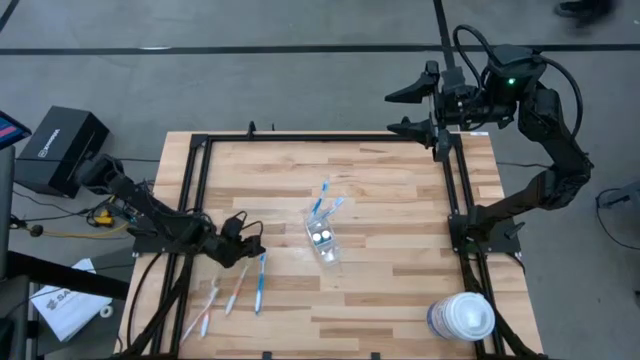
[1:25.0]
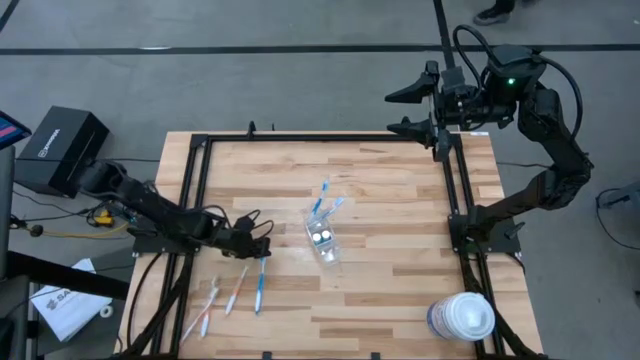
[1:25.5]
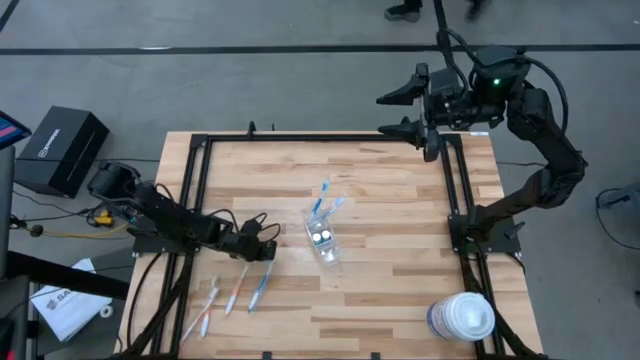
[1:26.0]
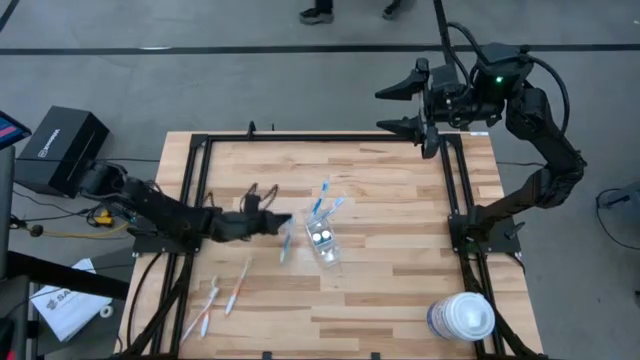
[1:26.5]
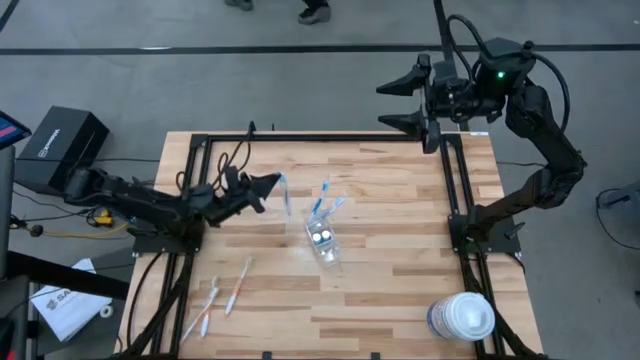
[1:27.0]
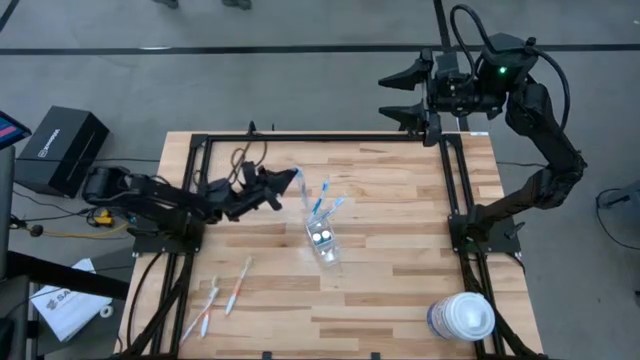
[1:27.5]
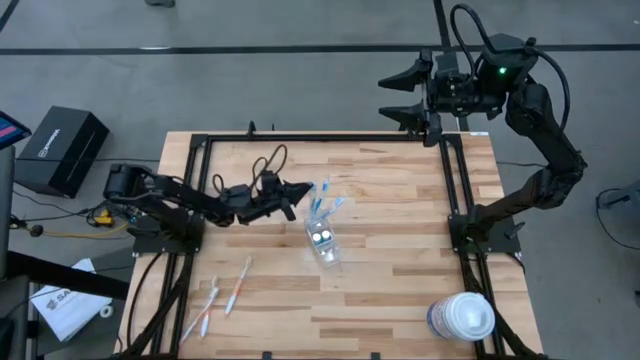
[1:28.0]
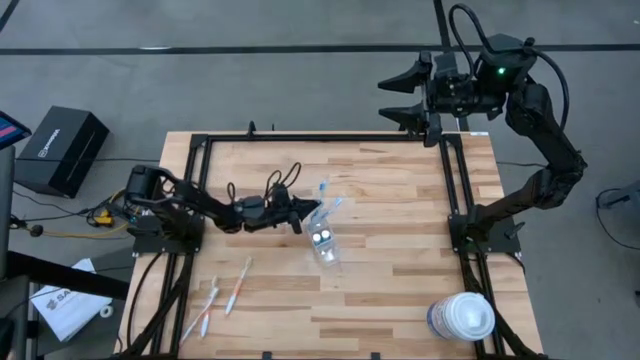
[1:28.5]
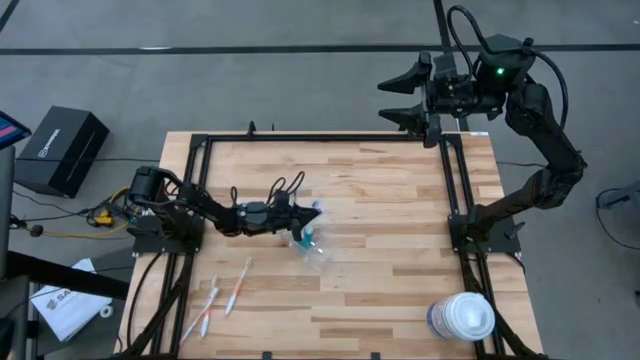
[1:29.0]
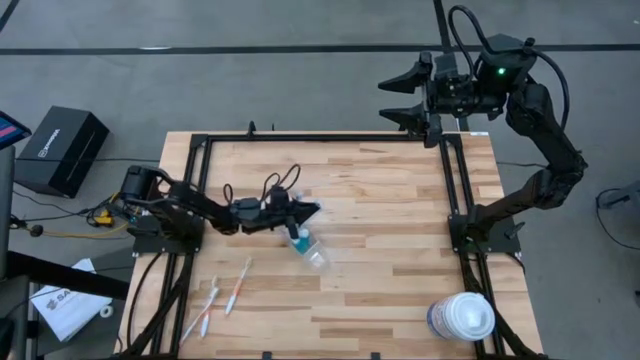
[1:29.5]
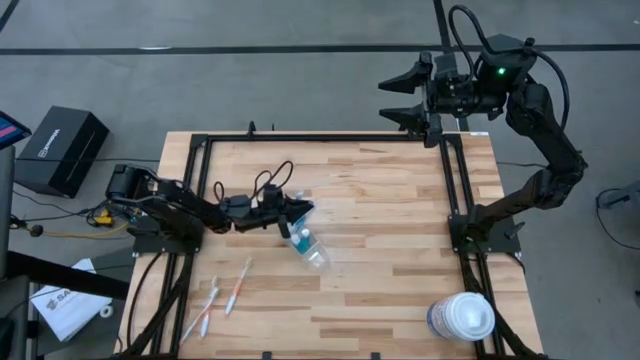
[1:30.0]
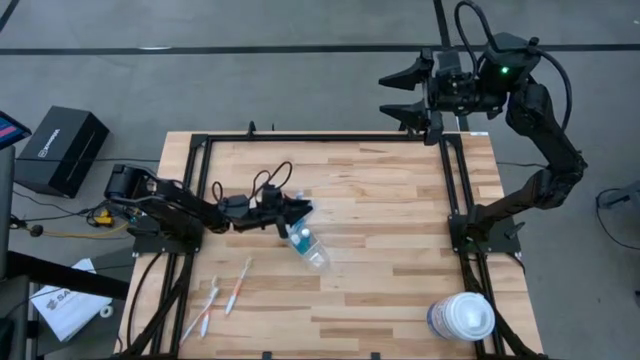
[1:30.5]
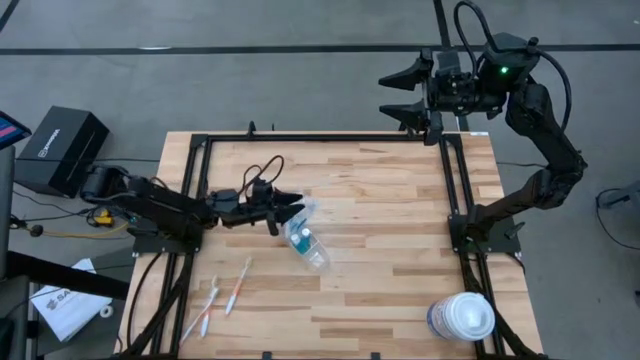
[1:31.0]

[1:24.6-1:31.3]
Task: Pick & Place toothbrushing station
Put the blue toothbrush into the transparent organizer

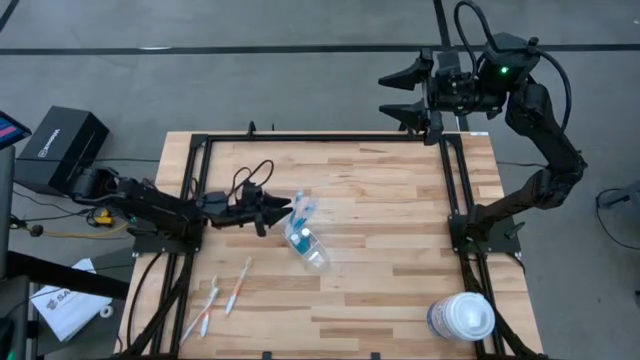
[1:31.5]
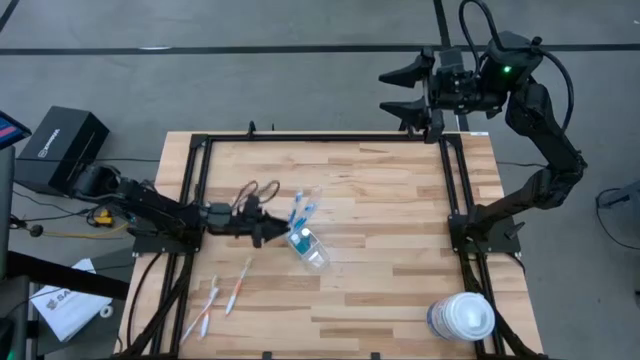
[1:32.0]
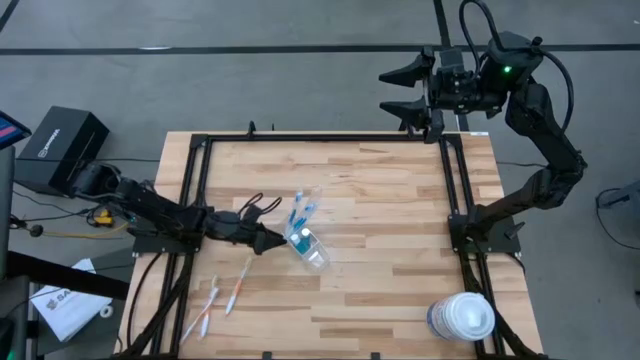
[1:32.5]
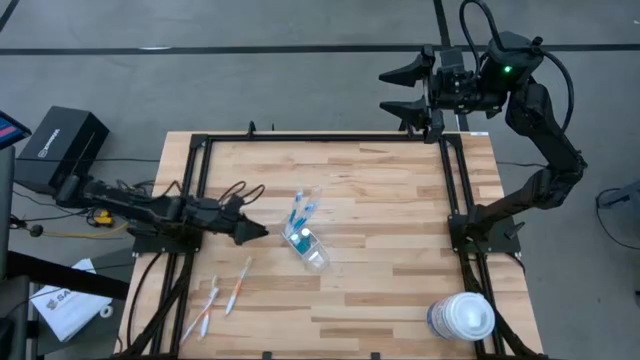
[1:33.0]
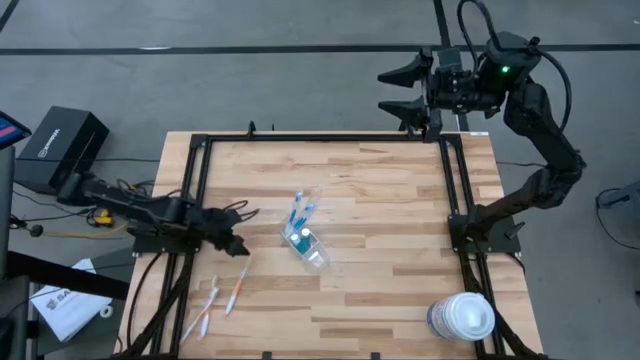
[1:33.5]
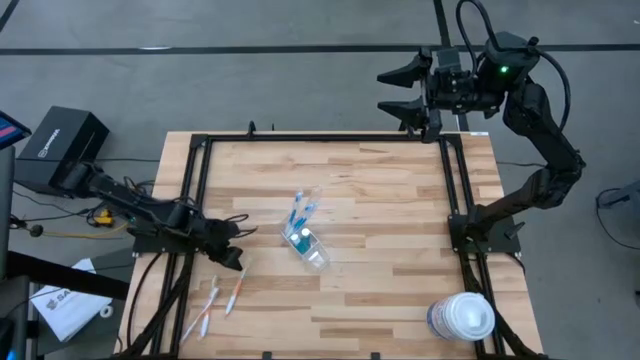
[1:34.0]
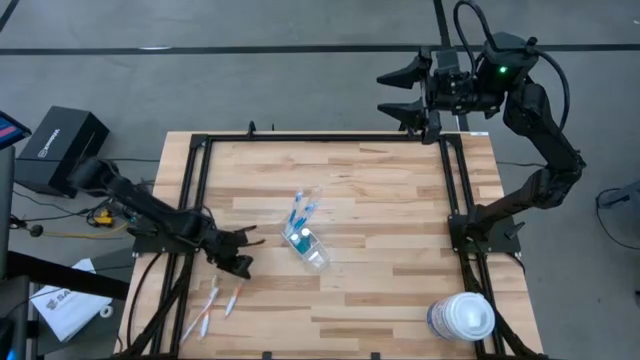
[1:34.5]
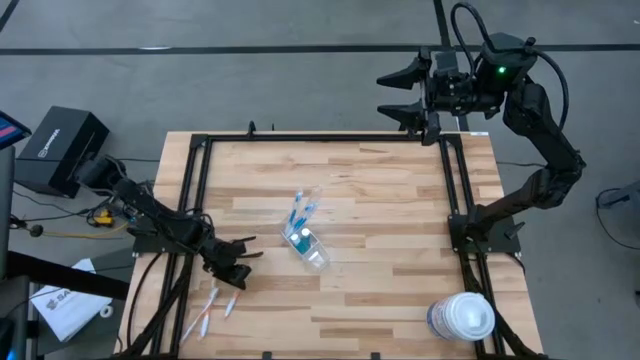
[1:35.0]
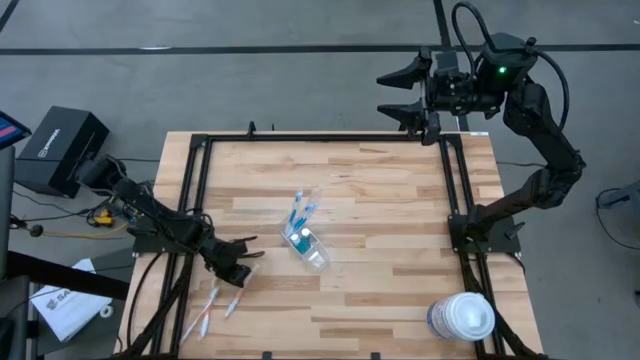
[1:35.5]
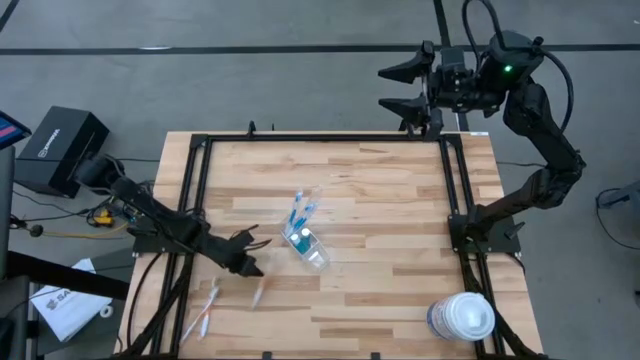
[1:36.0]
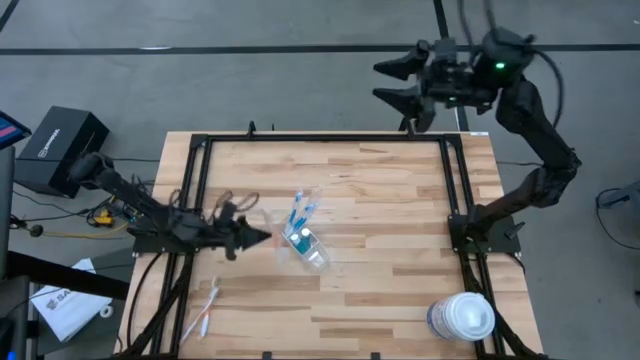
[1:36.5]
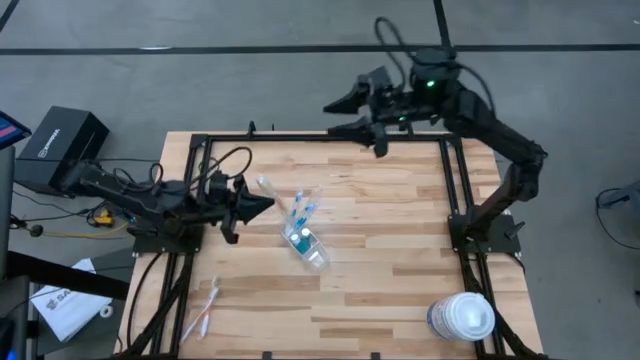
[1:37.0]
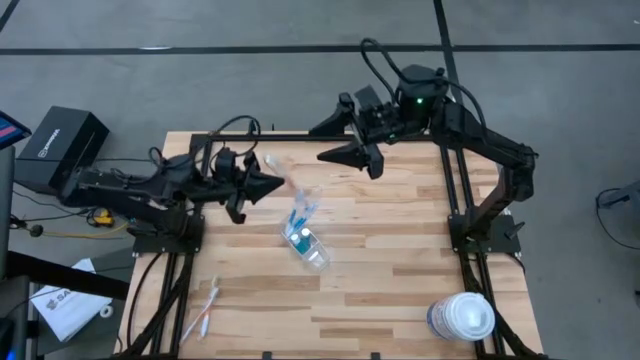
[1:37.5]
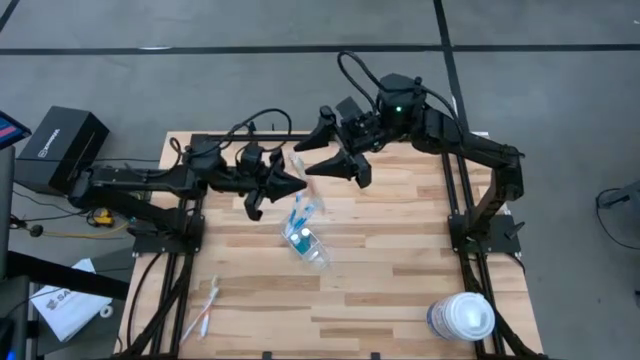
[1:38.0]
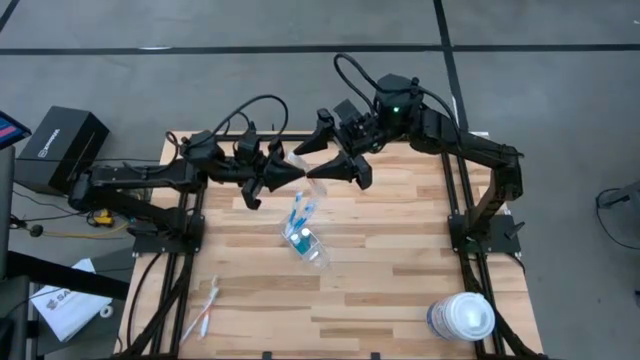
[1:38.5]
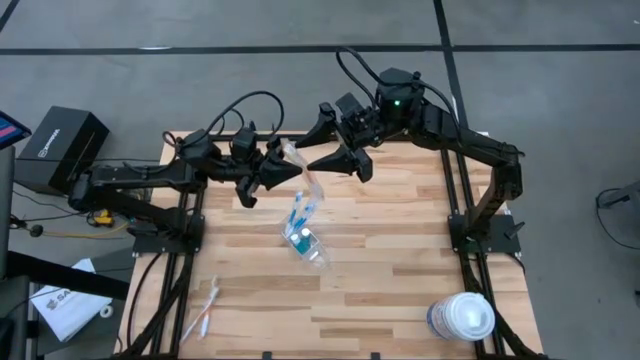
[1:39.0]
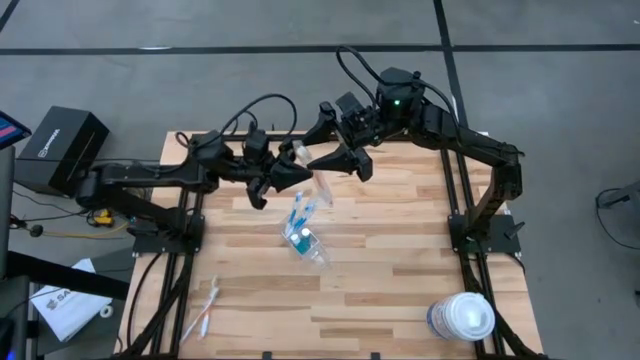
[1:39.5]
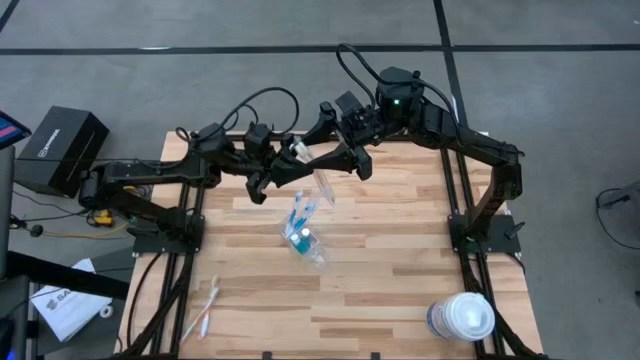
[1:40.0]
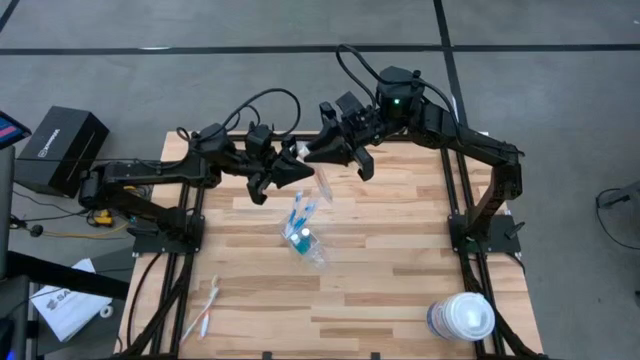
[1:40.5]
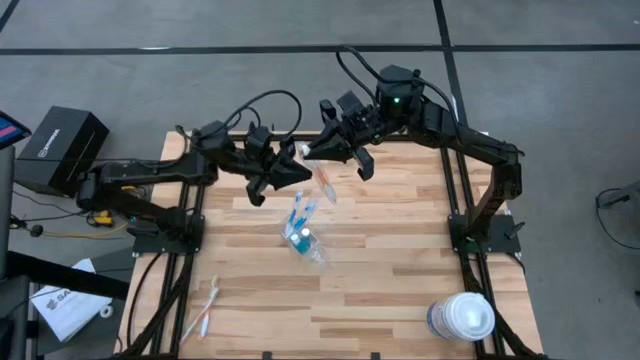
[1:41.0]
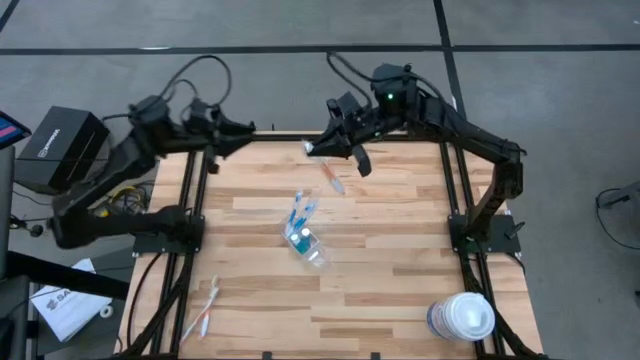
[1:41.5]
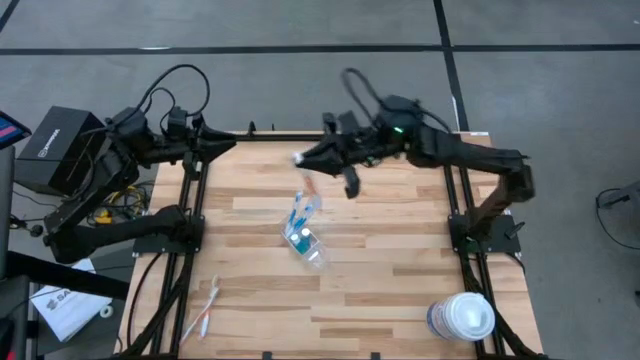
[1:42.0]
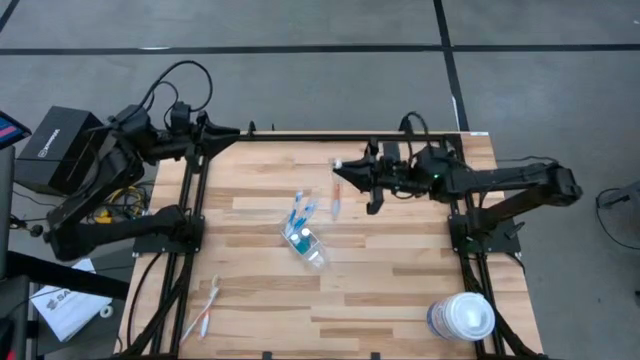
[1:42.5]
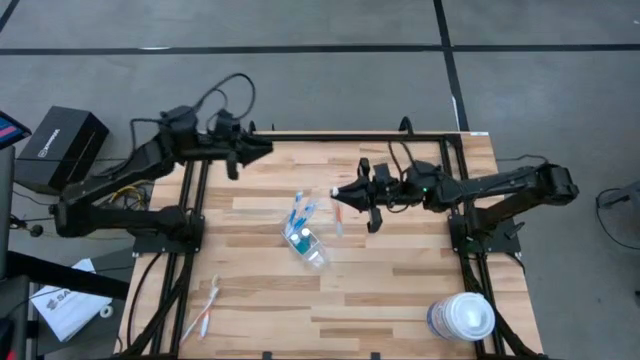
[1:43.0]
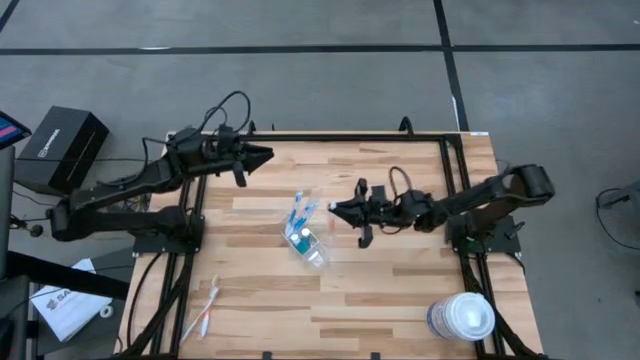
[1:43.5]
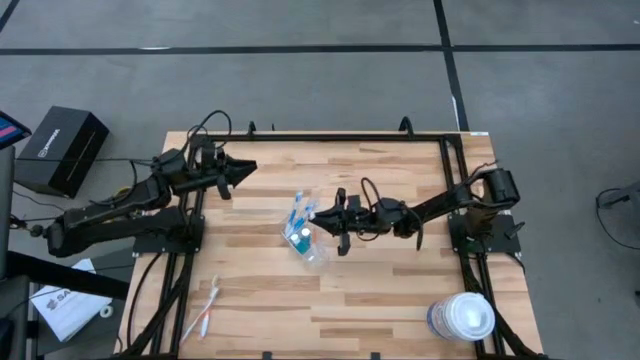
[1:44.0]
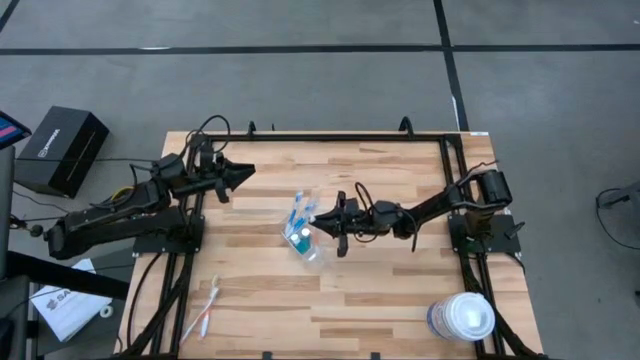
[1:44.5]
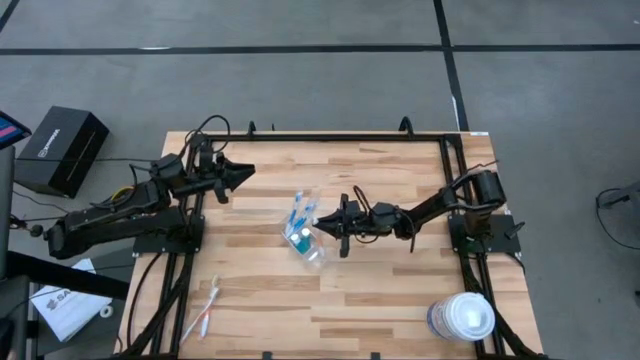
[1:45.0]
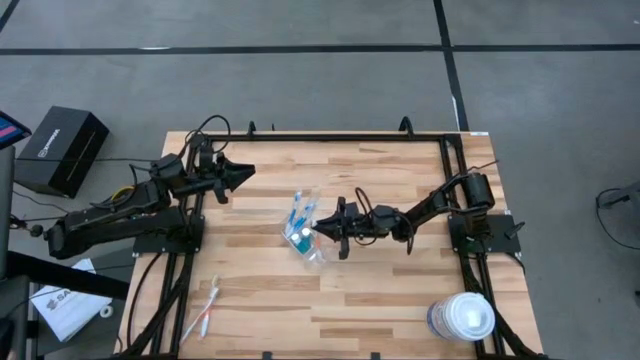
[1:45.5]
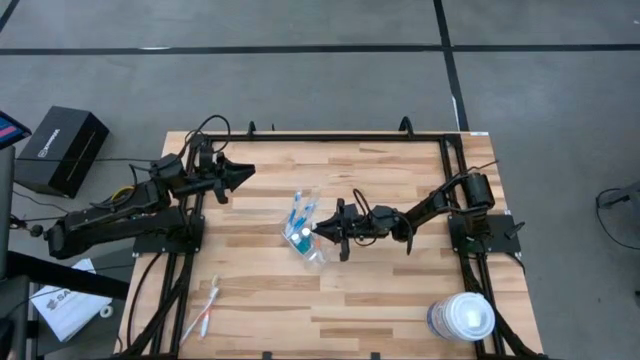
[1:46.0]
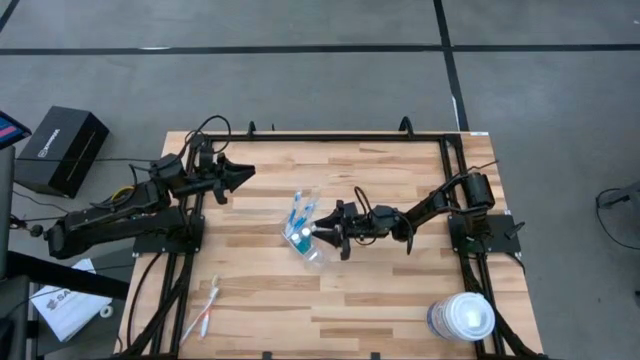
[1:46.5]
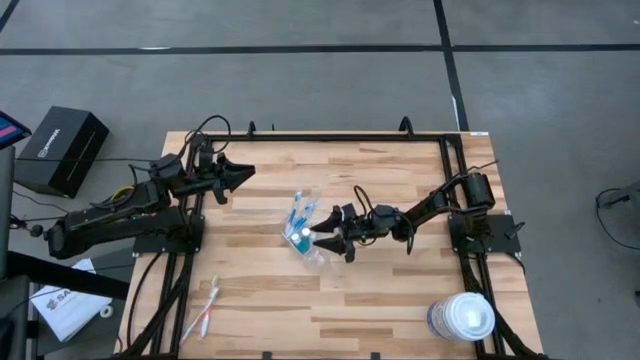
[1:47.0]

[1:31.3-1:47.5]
Put the right orange toothbrush into the transparent organizer
